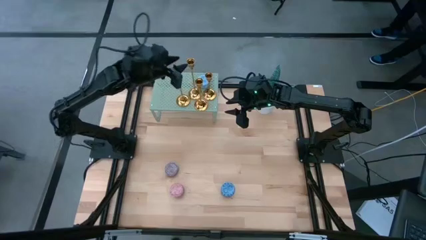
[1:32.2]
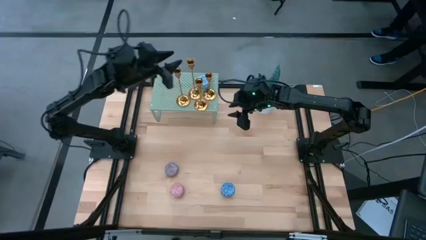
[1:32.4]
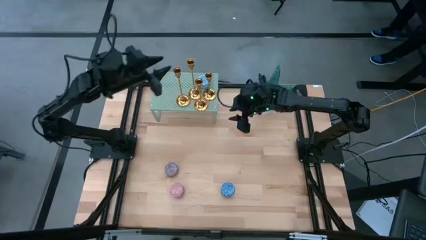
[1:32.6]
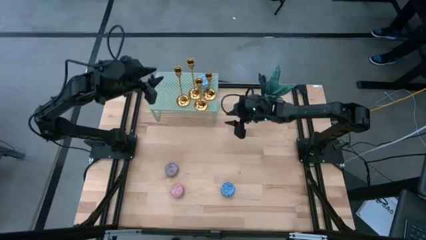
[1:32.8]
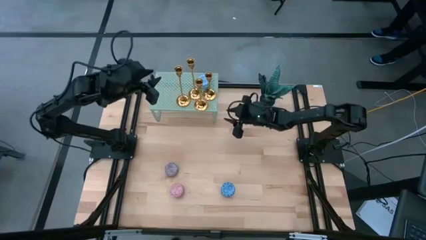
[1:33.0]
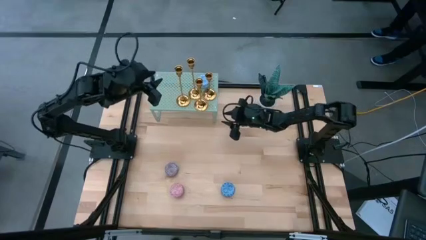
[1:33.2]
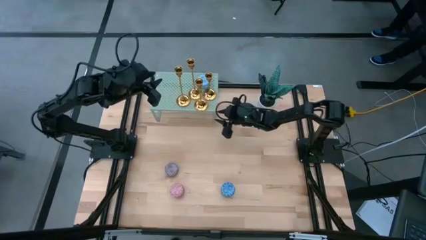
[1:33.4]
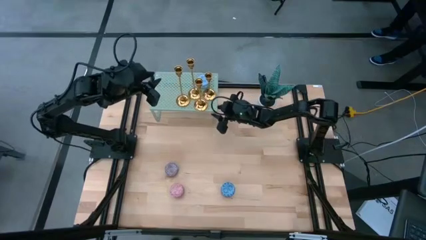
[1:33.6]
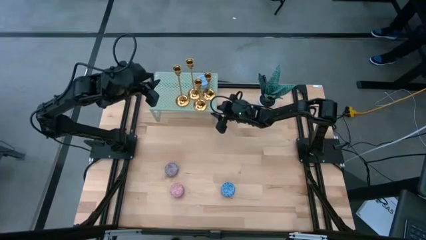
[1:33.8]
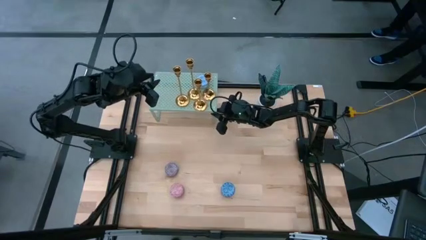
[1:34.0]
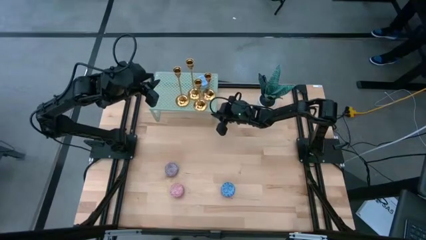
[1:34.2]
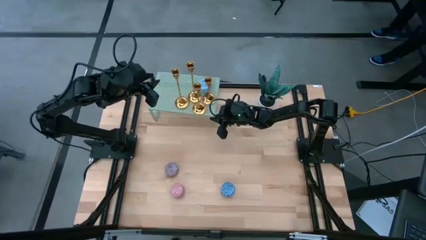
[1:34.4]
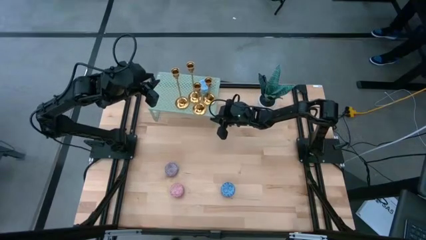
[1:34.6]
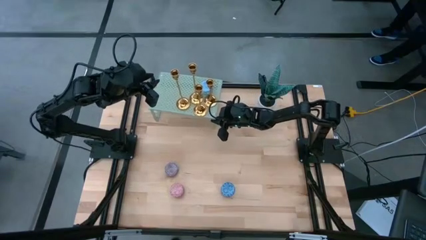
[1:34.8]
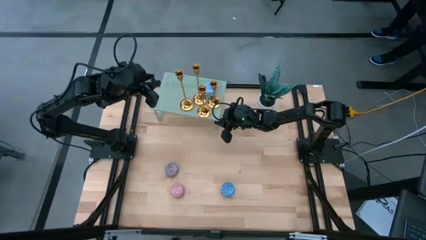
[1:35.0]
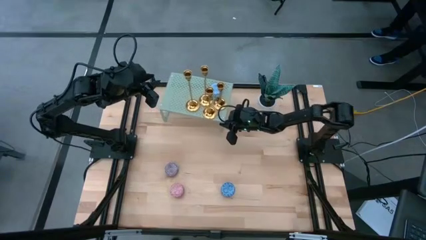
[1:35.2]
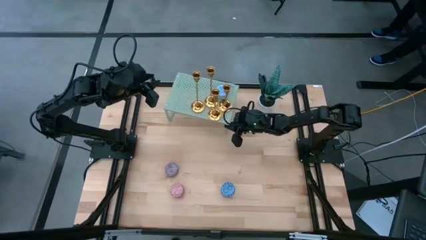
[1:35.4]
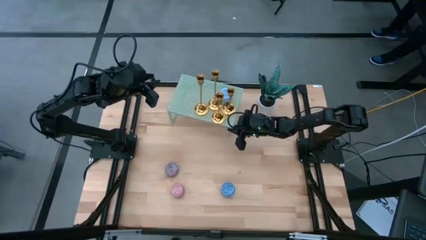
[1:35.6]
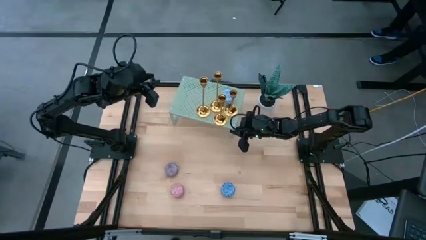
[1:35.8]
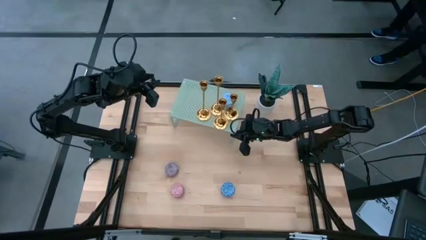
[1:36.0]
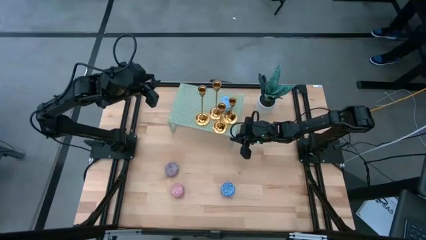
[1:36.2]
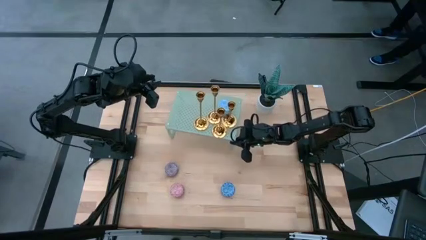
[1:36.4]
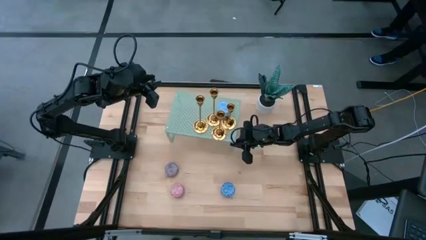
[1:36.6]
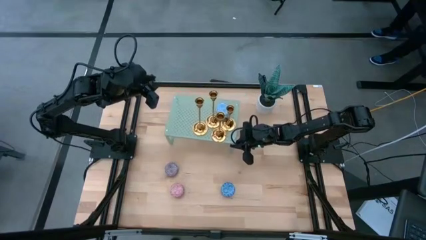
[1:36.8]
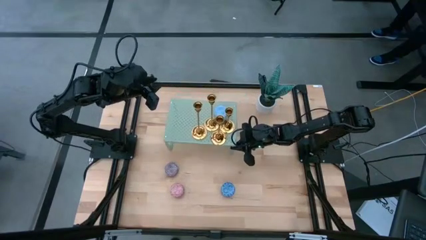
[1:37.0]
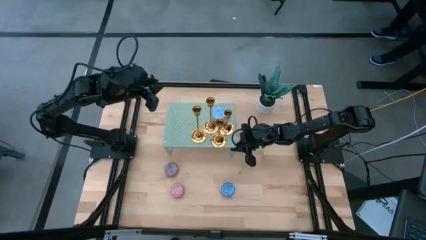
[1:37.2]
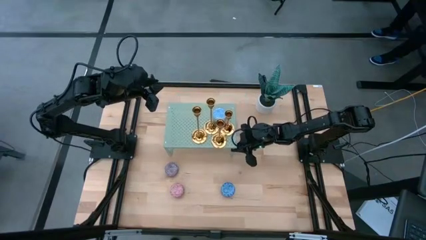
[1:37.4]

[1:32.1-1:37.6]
Task: Pick & Place candle stick holders
Move the shelf to the center of the table

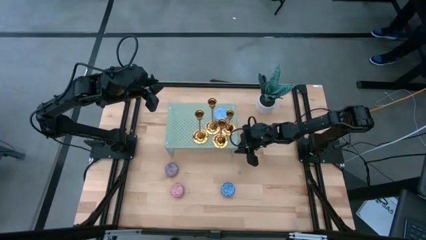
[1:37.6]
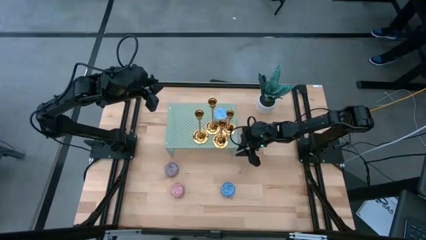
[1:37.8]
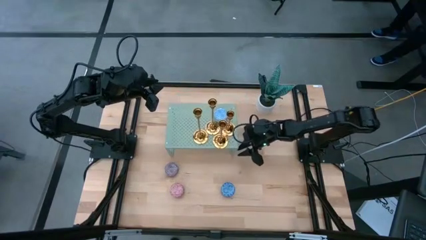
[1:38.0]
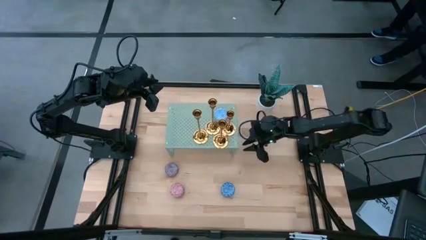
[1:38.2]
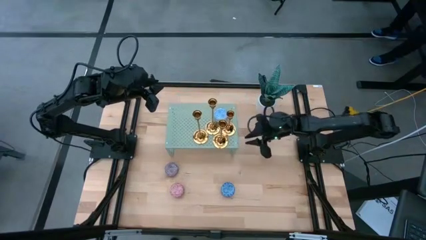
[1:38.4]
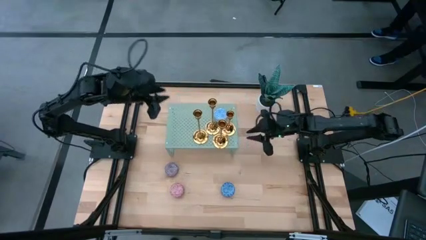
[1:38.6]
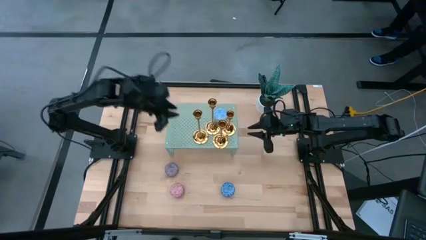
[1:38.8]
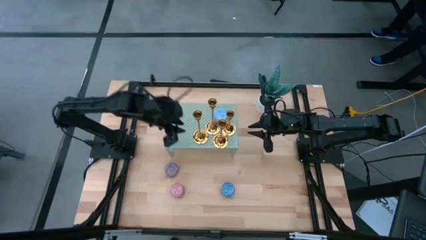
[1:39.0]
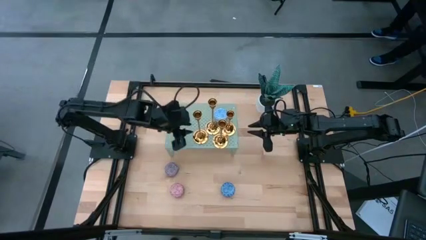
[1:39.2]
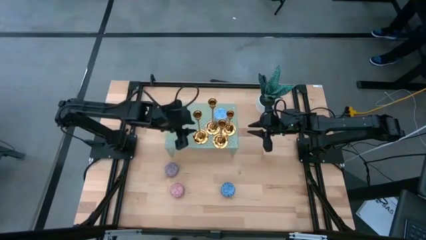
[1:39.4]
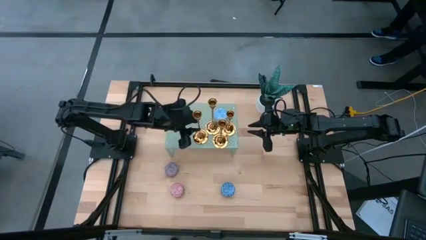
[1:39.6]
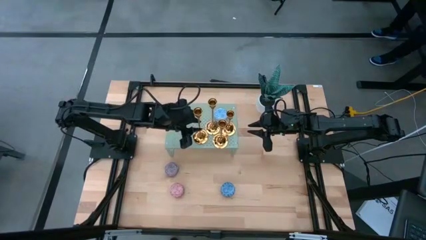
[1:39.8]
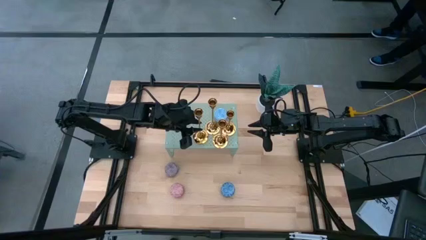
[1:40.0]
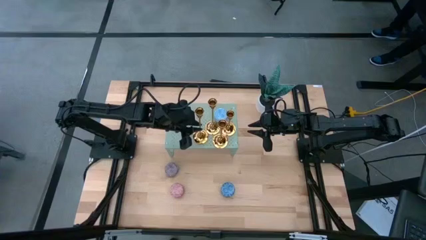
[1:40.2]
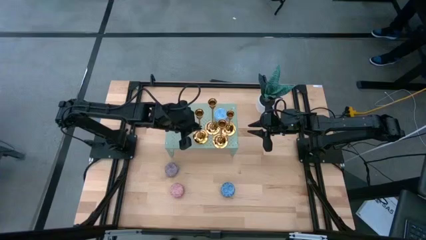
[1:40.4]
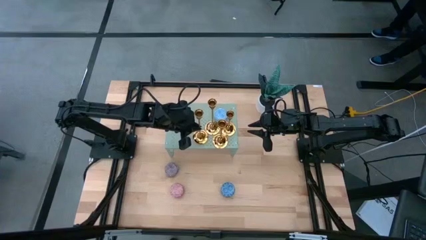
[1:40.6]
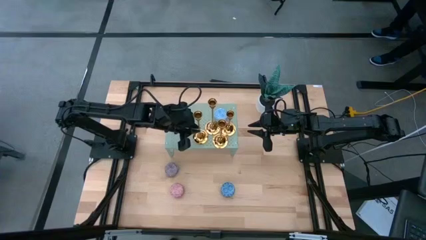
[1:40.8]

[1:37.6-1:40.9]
Adjust the gold candle holder on the shelf

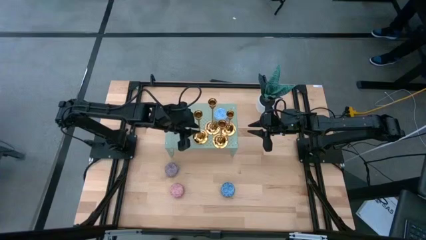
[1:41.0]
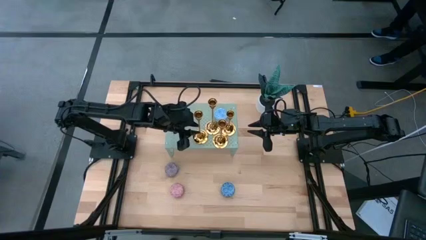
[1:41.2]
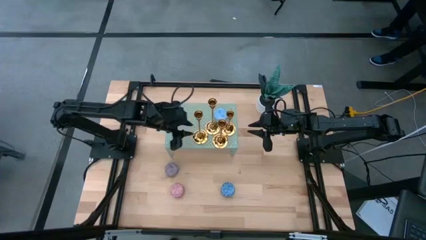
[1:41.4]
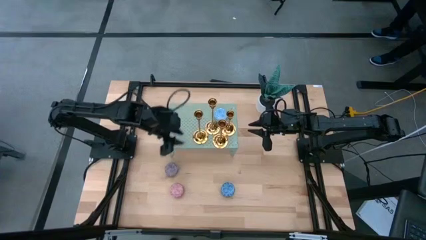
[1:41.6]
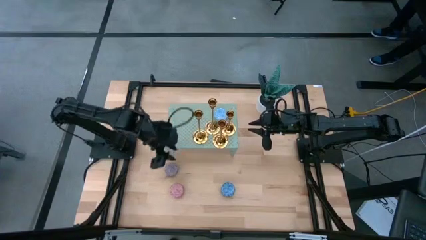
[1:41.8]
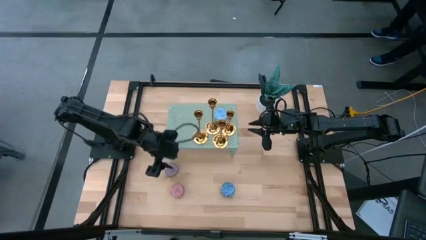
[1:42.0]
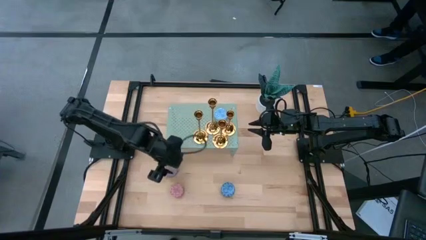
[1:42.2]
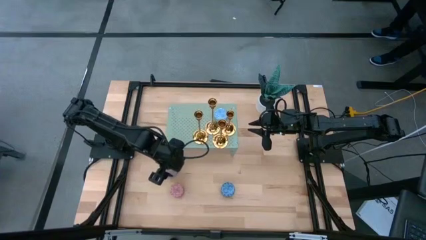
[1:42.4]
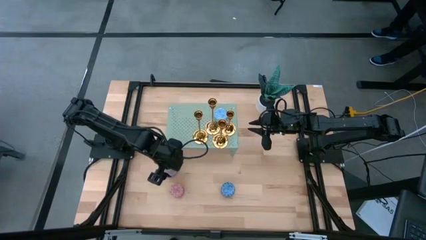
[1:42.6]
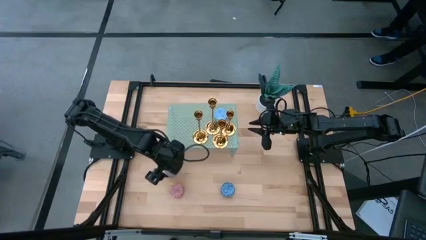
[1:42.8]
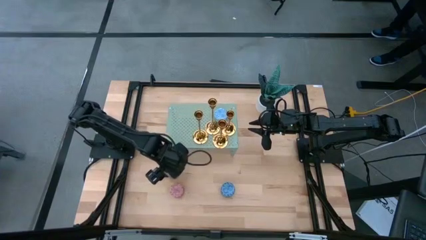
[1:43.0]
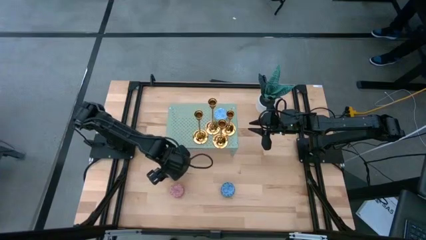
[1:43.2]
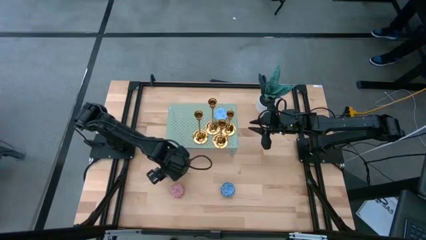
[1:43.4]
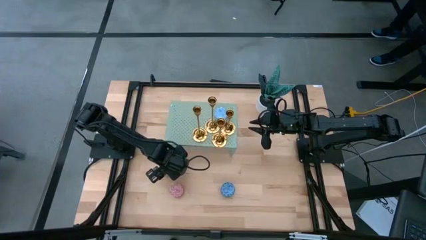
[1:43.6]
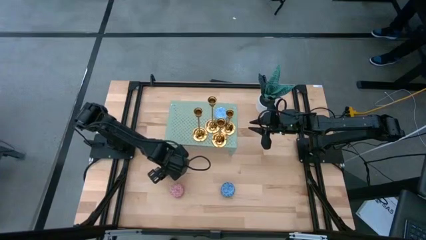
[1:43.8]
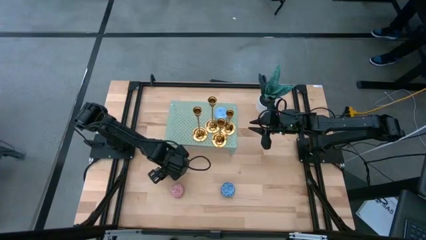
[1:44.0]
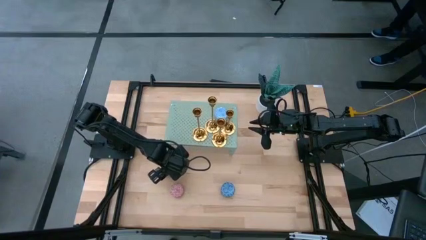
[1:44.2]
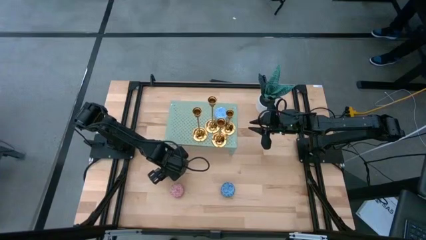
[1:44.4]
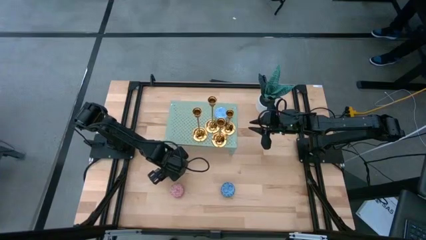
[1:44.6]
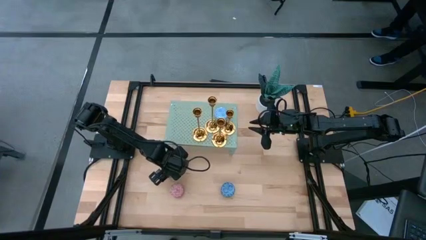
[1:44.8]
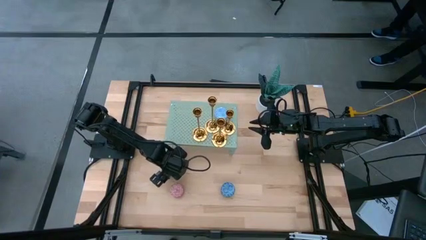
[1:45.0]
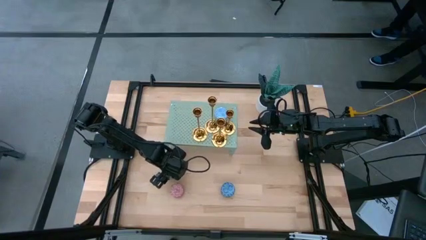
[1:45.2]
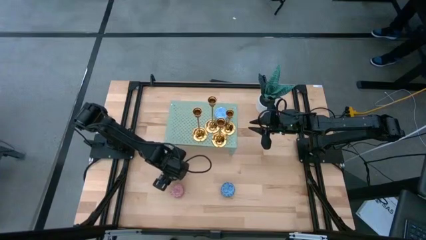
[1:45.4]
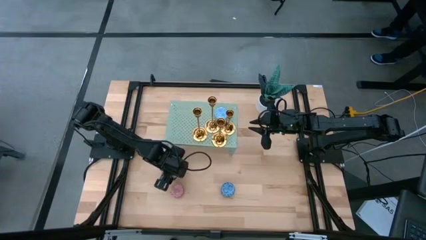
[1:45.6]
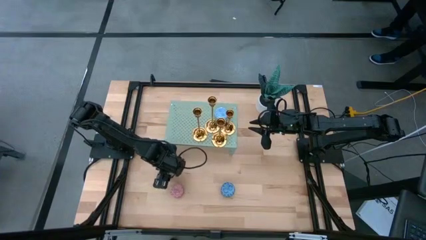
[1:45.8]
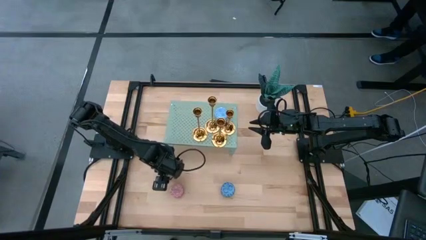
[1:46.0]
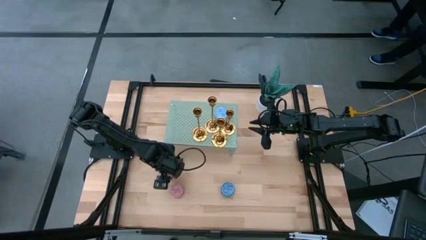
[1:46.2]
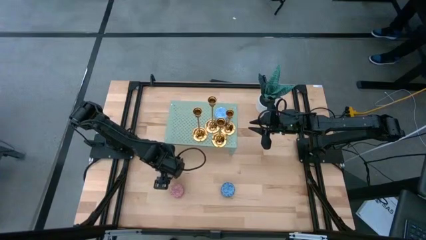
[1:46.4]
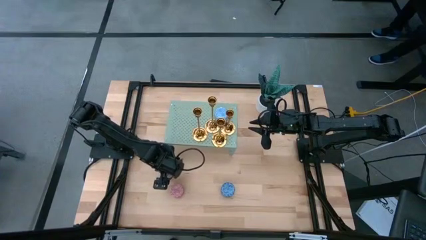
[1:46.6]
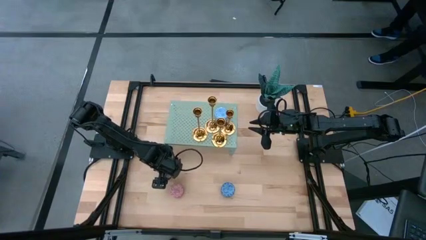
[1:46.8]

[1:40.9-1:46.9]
Put the red scented candle on the shelf

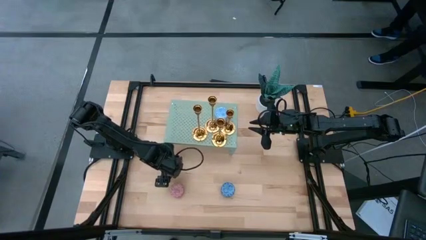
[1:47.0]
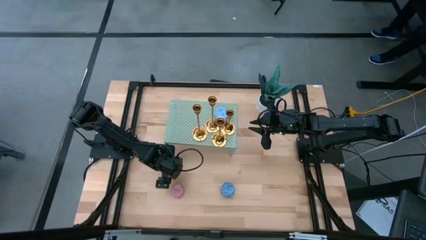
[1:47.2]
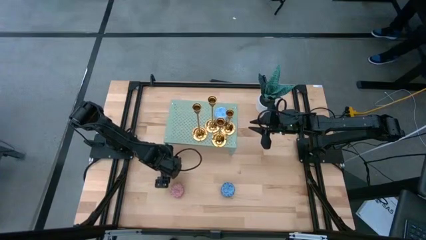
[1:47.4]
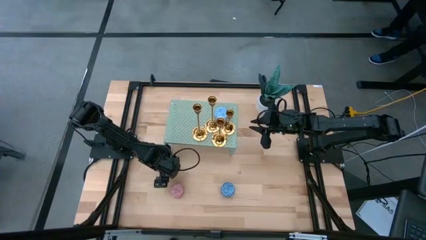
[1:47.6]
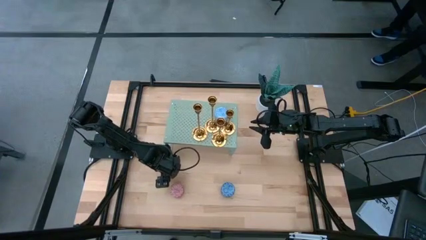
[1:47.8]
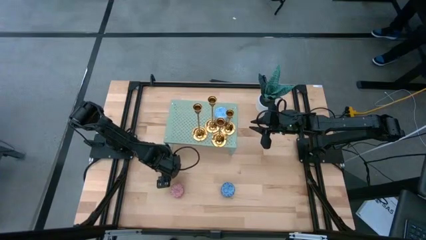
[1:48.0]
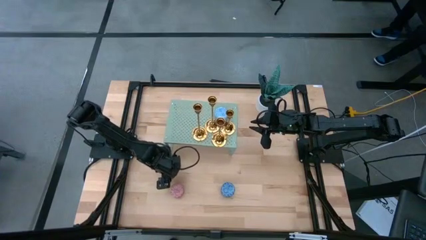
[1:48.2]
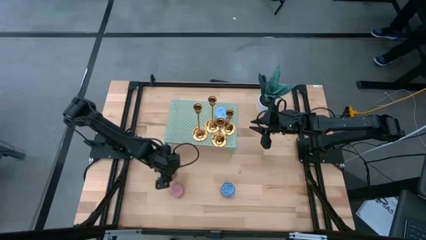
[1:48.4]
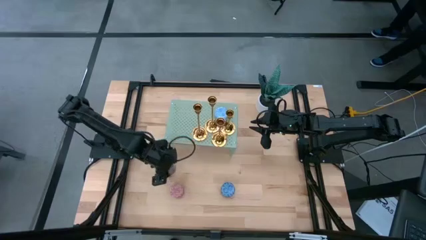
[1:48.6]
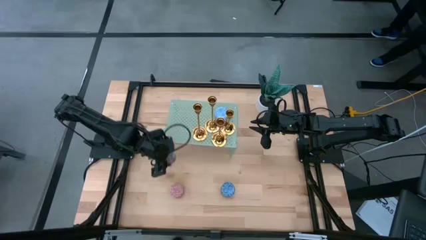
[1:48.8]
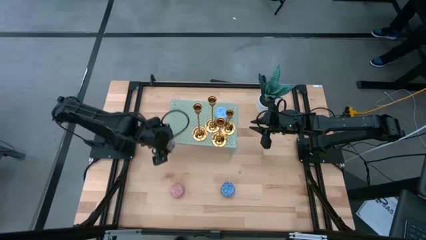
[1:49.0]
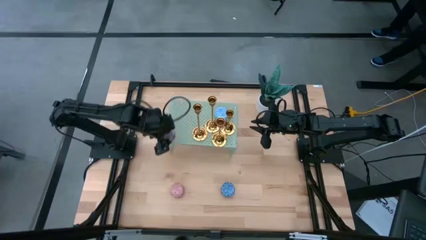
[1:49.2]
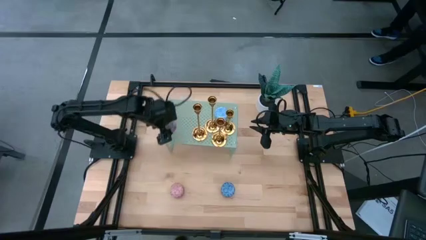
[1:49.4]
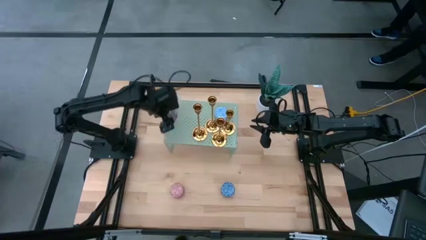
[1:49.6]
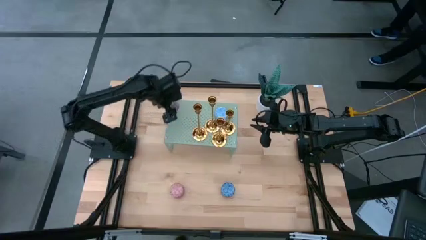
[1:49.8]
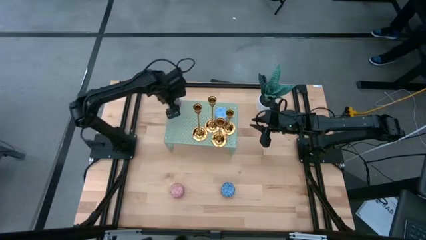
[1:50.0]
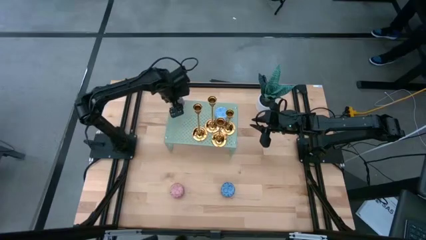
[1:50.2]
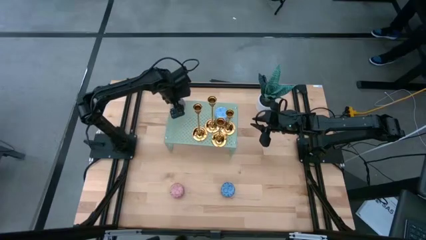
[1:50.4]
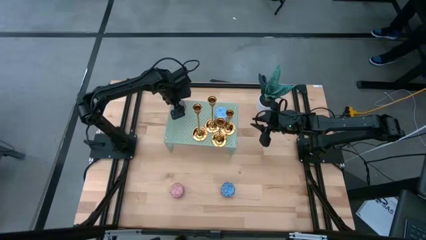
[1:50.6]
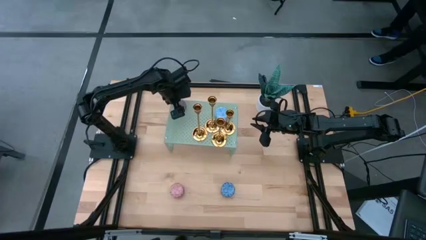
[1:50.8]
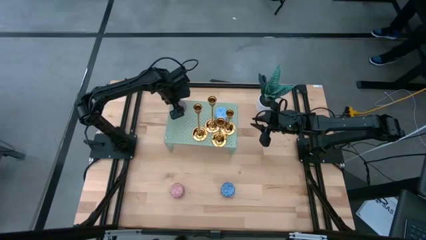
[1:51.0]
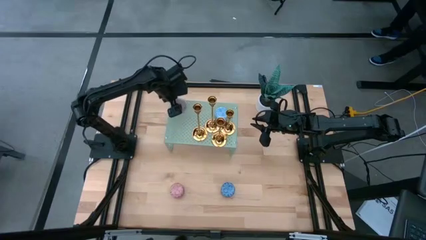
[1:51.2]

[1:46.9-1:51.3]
Put the red scented candle on the shelf
